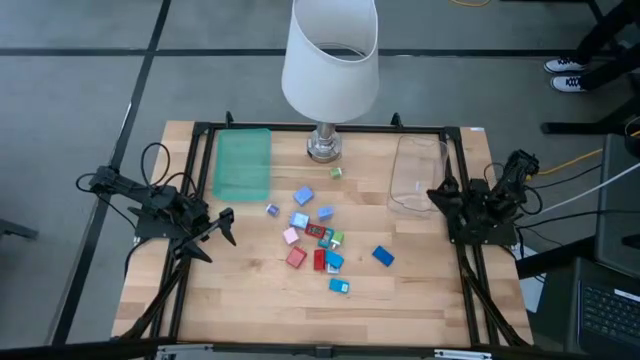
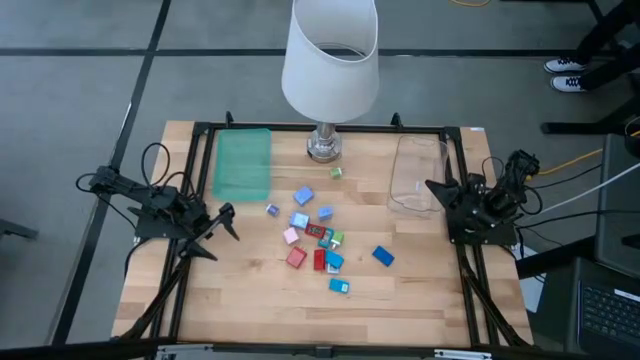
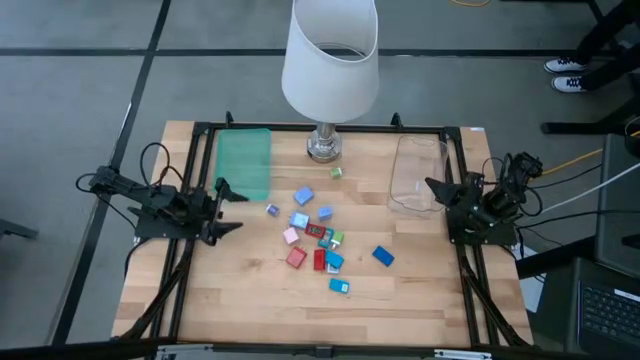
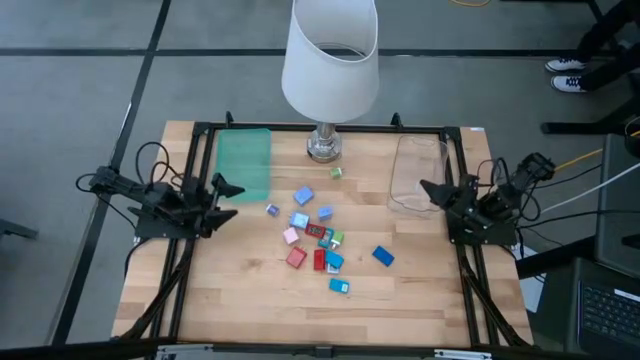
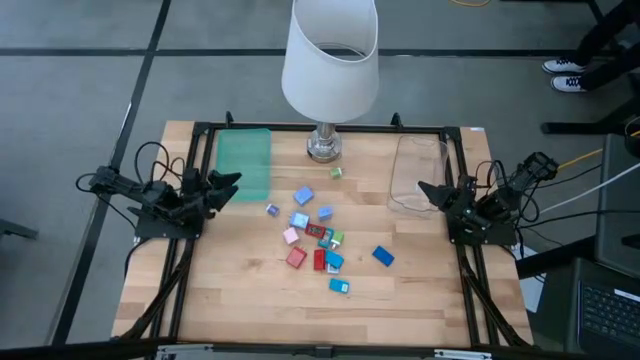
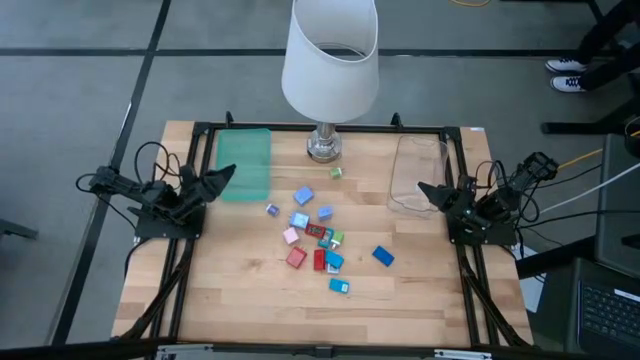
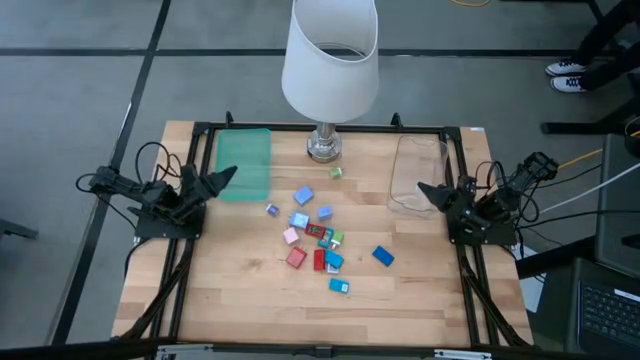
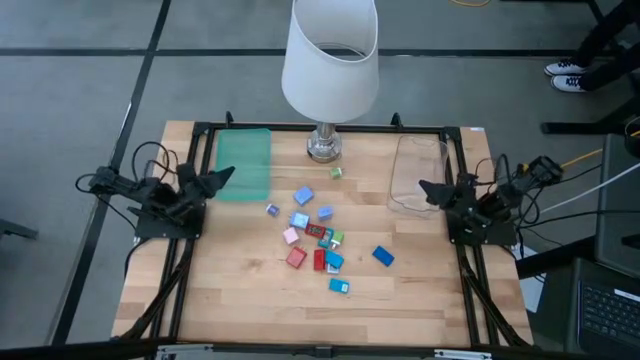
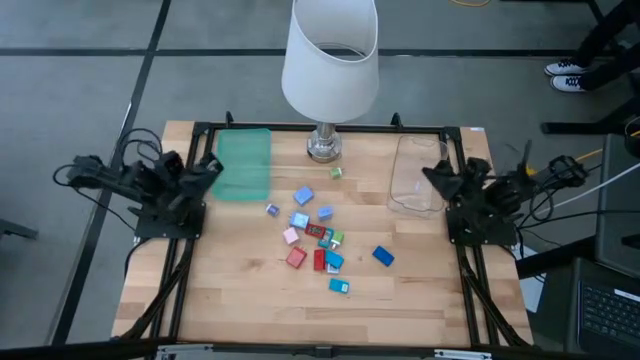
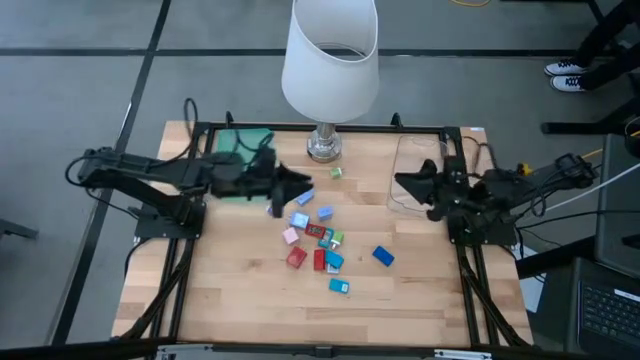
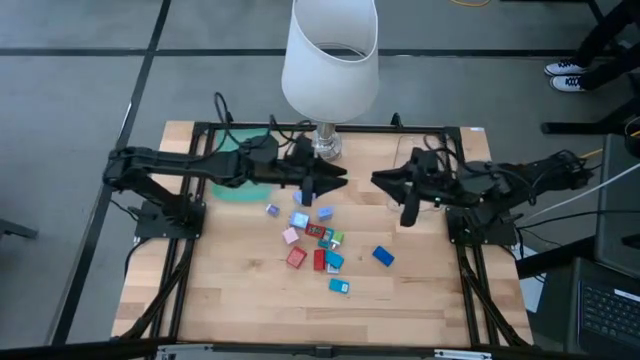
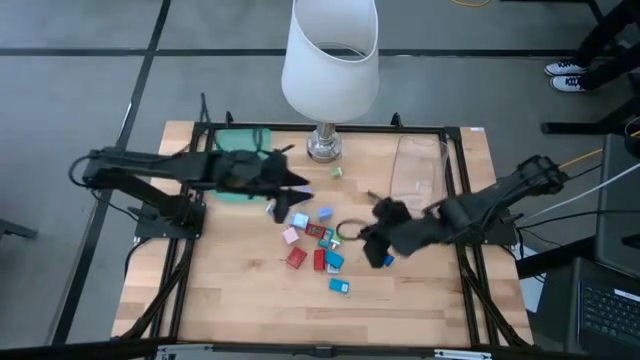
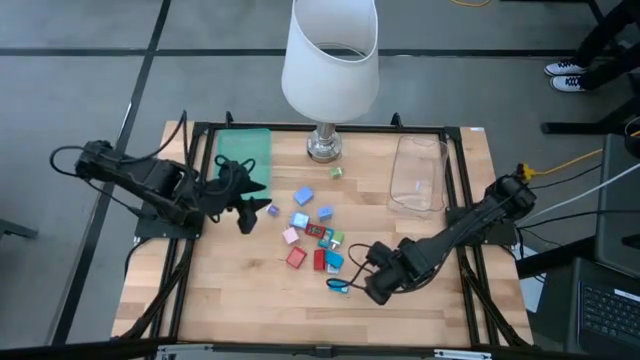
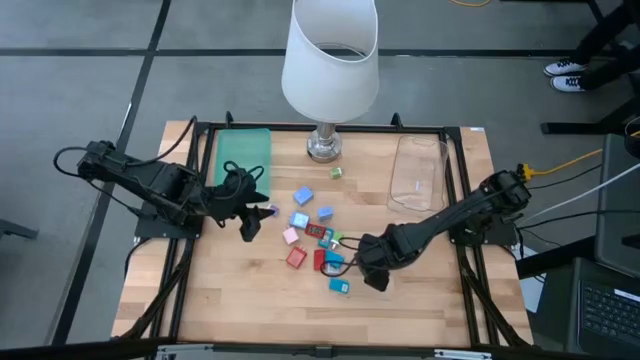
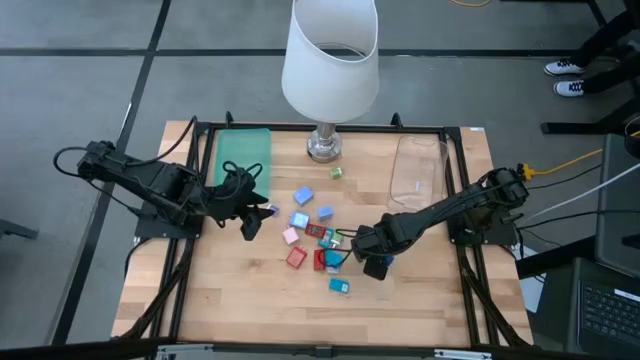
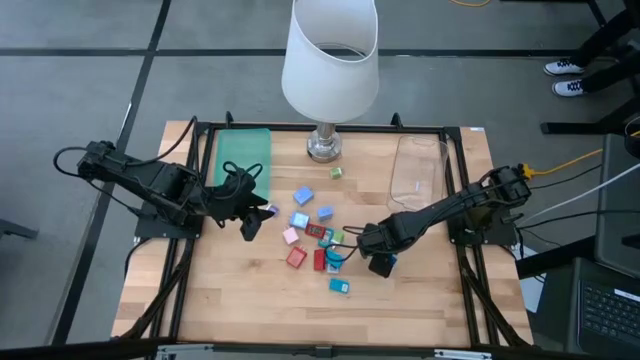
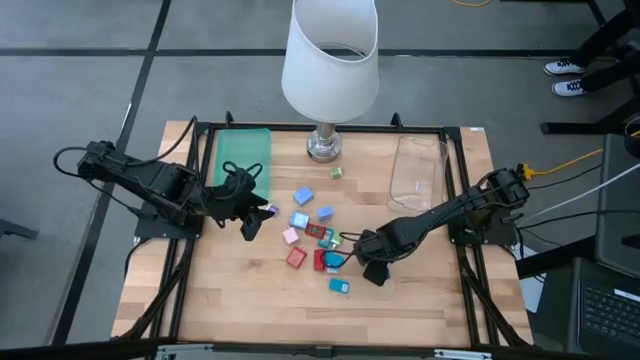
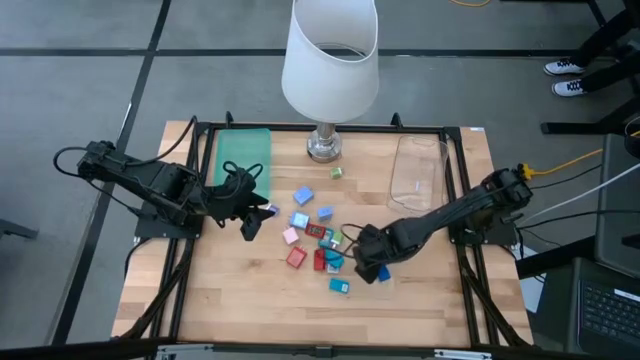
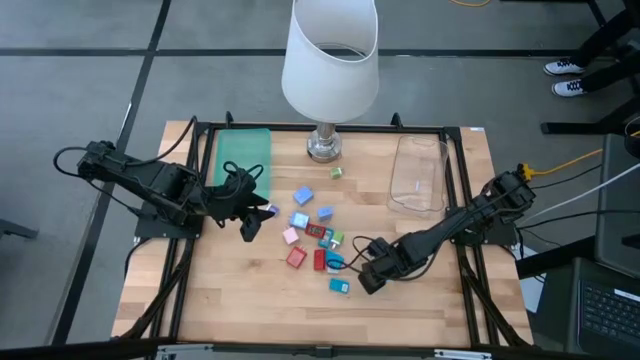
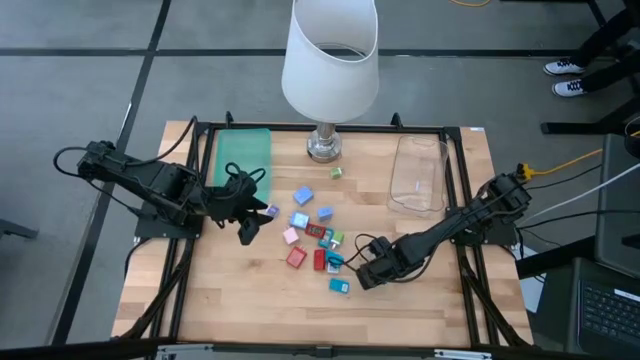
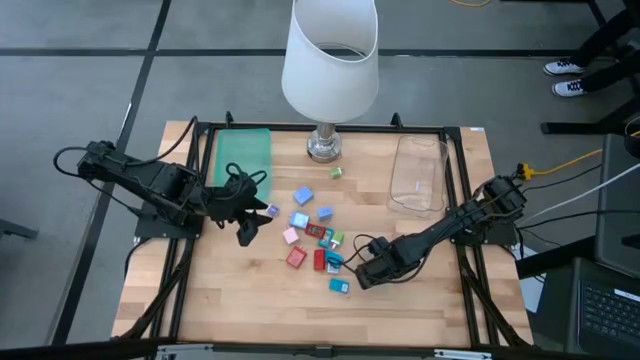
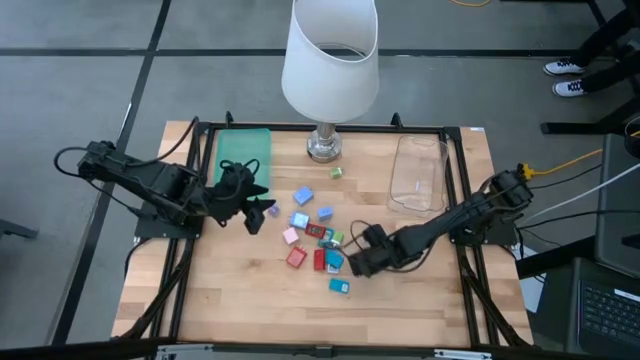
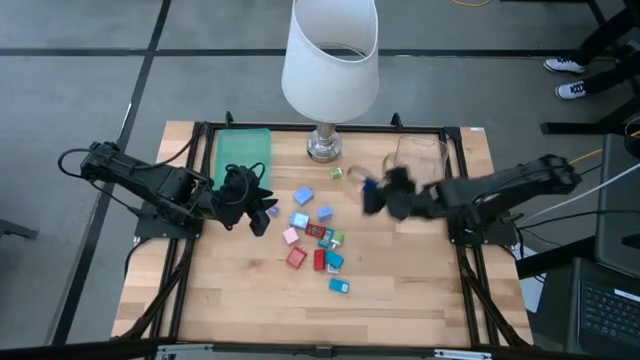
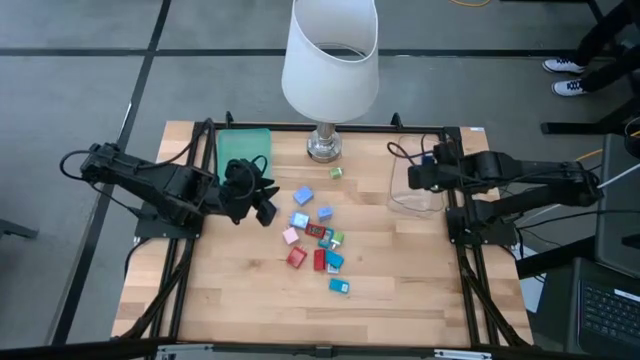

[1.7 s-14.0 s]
Task: Pick & Place Office items
Put the blue digital timer into the transparent bin

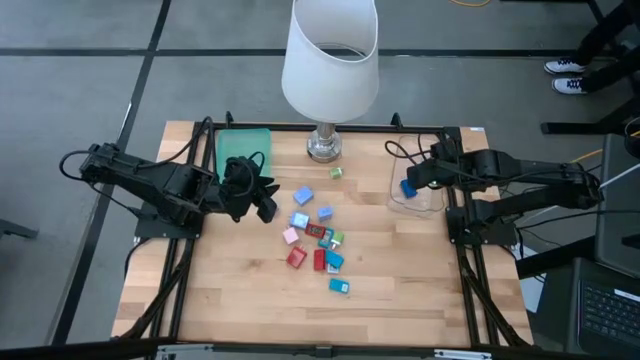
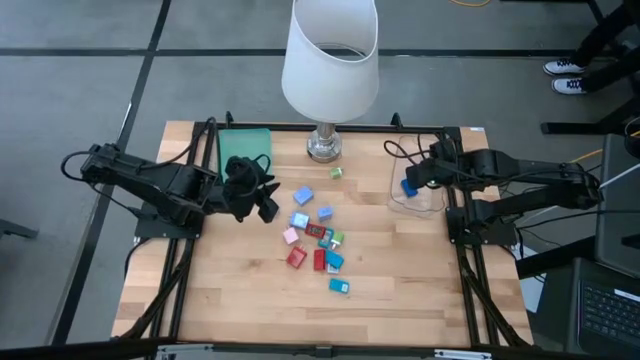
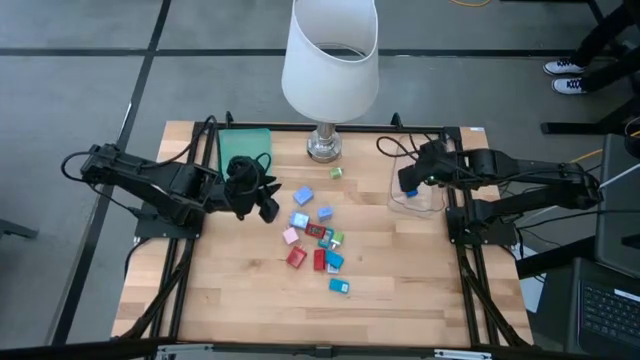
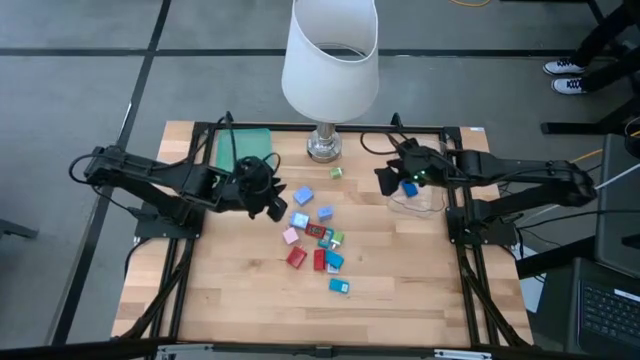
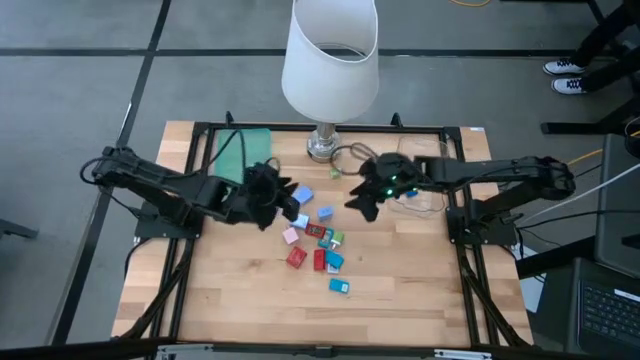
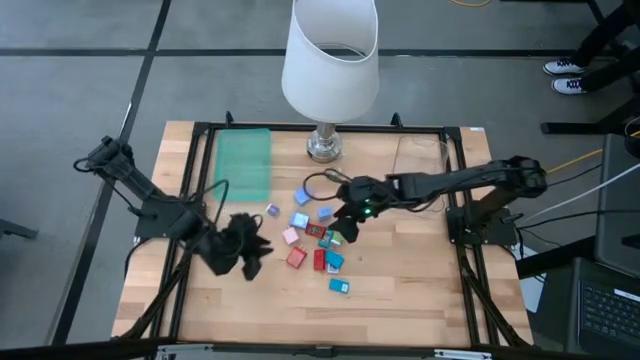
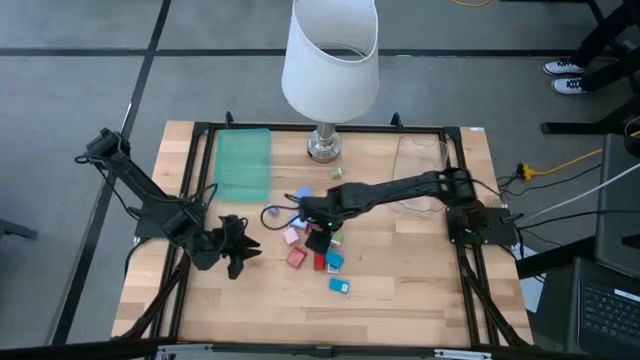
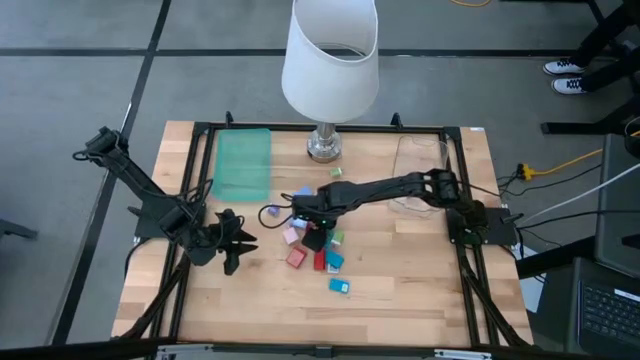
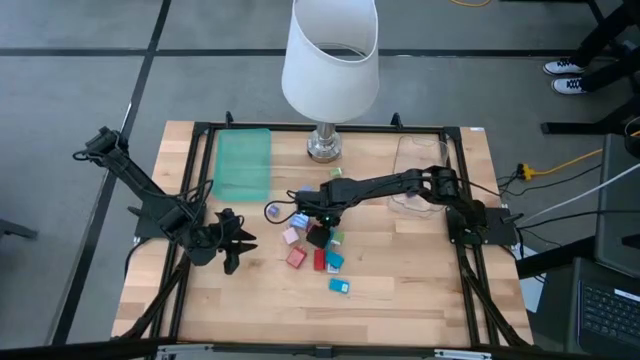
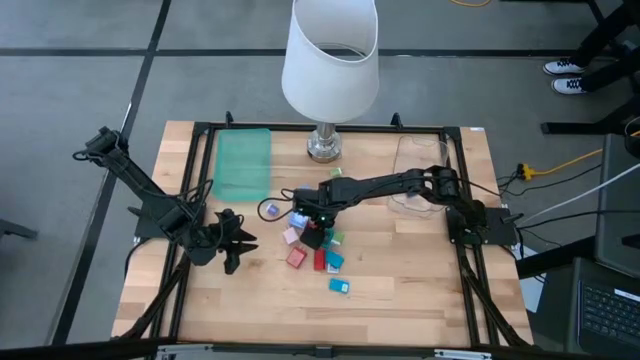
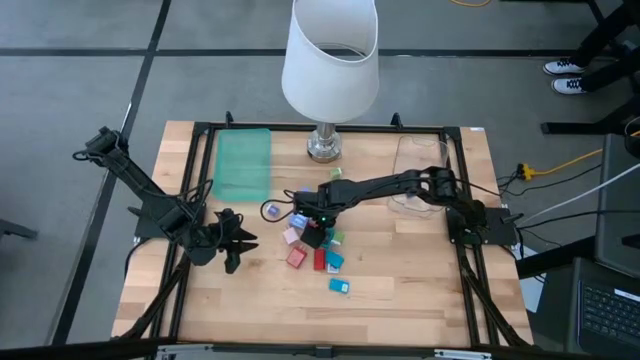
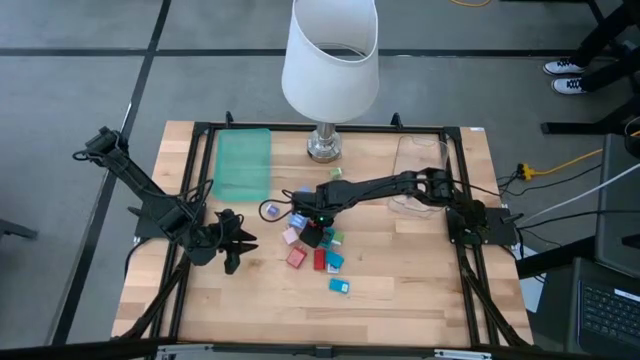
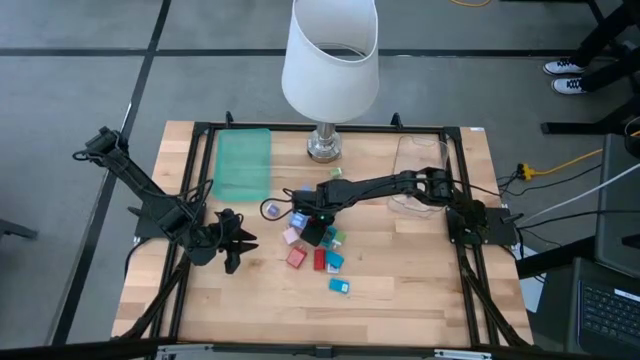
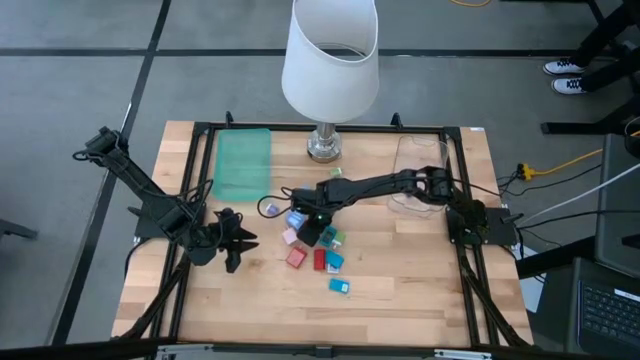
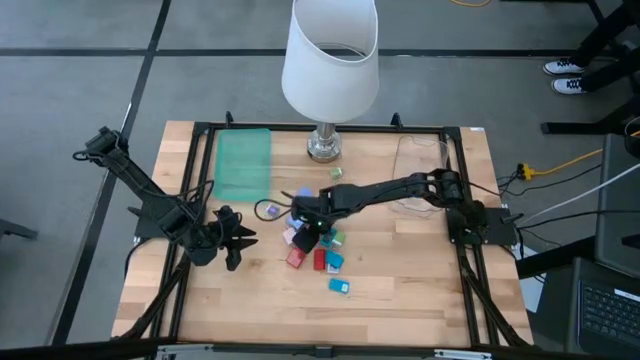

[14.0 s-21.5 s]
Put the red digital timer into the transparent bin

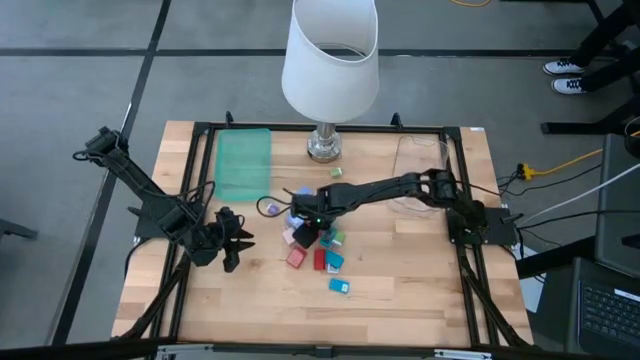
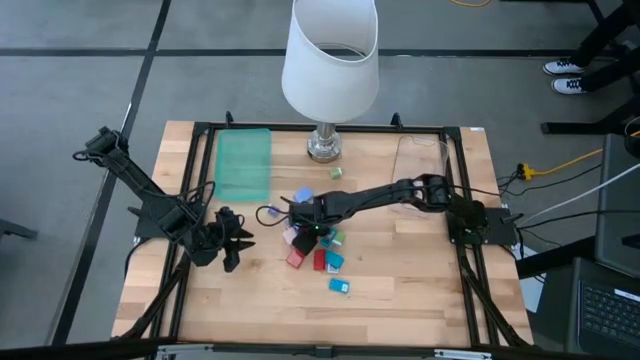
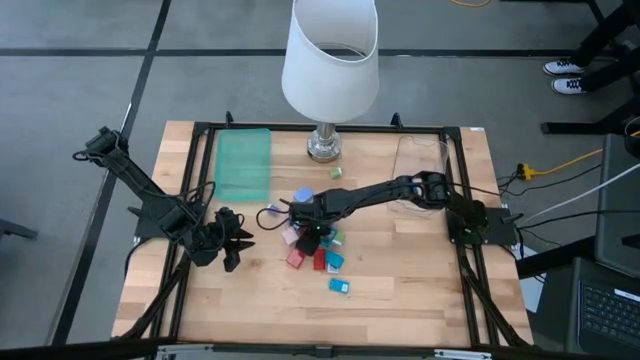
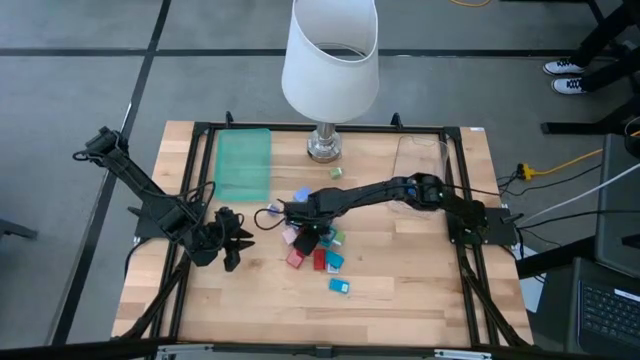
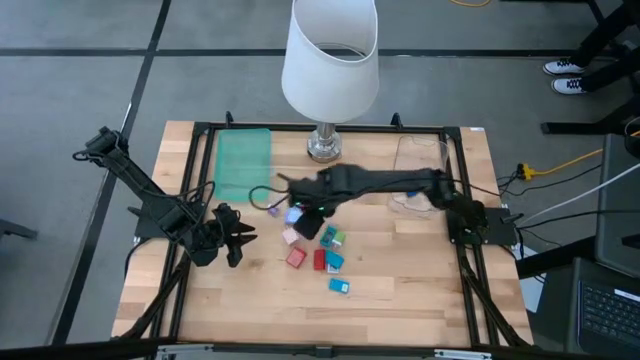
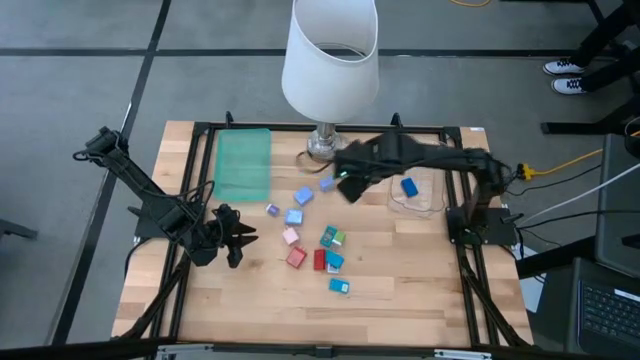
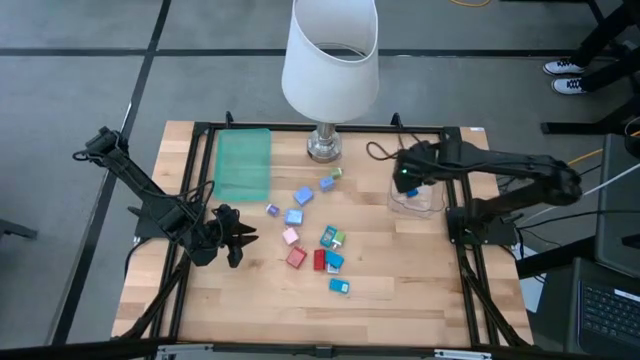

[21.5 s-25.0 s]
Put the red digital timer into the transparent bin
